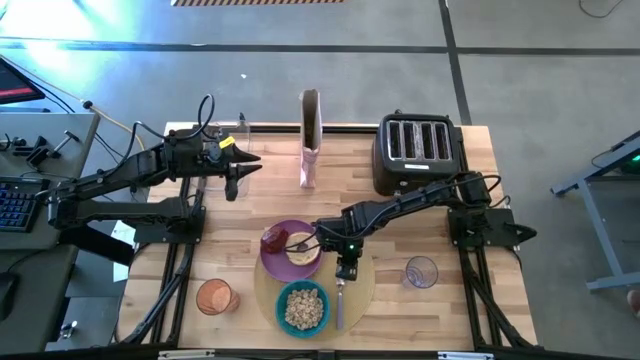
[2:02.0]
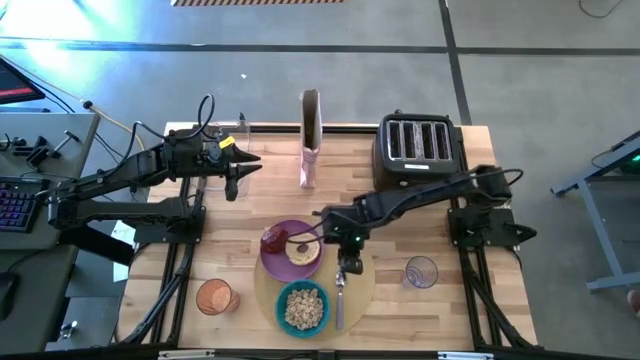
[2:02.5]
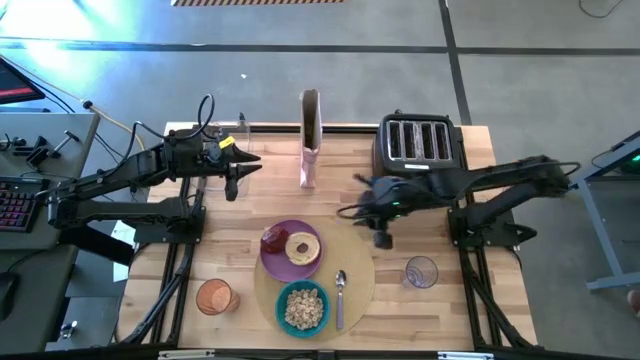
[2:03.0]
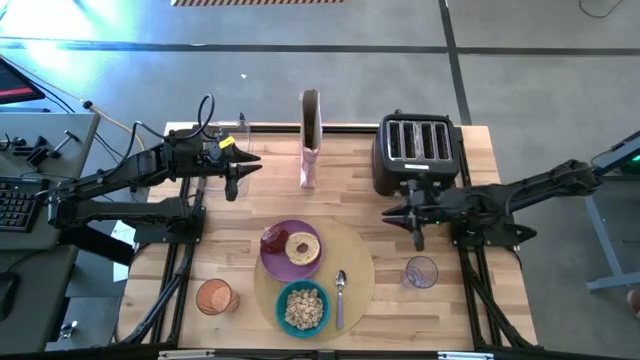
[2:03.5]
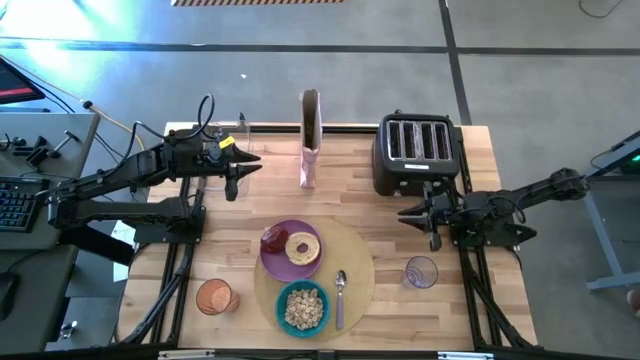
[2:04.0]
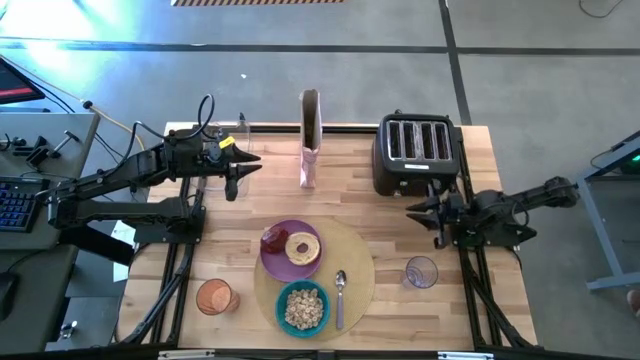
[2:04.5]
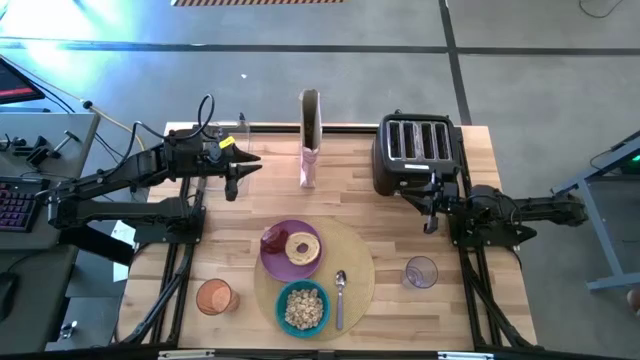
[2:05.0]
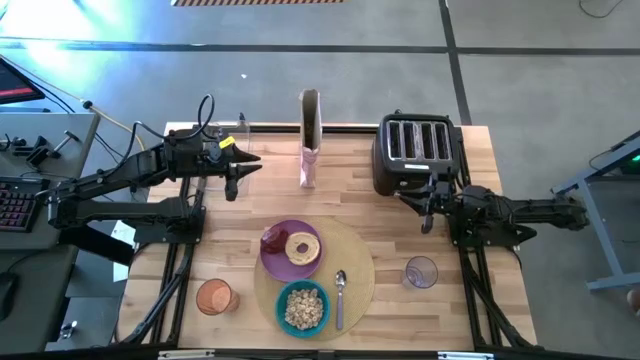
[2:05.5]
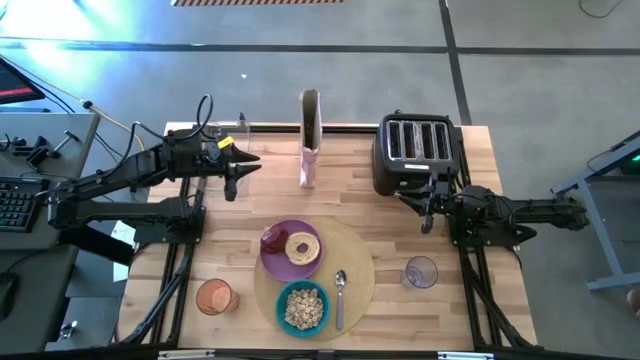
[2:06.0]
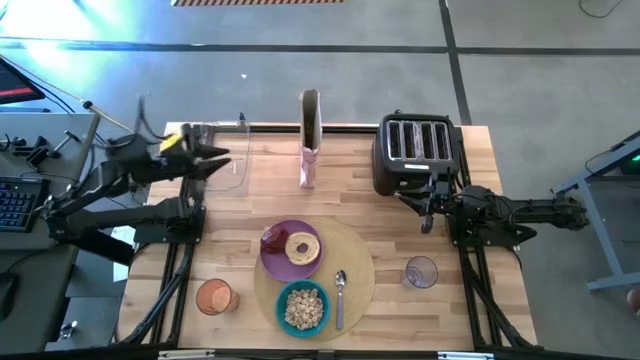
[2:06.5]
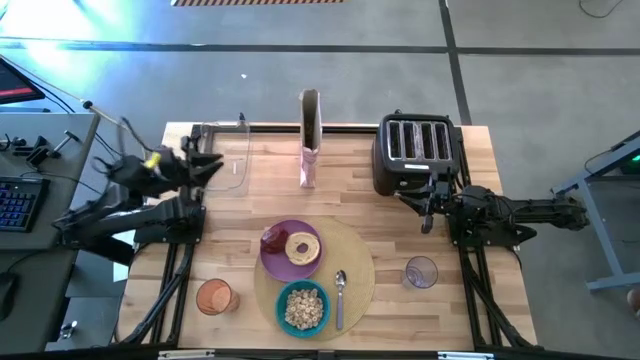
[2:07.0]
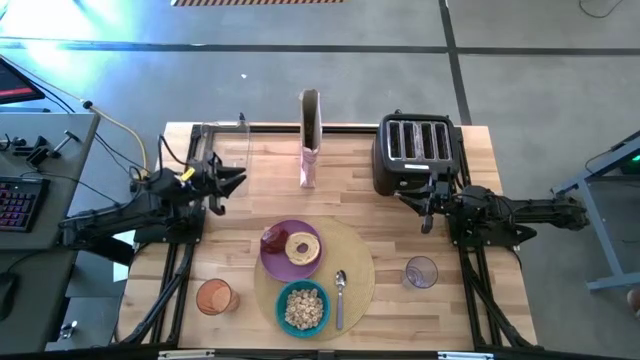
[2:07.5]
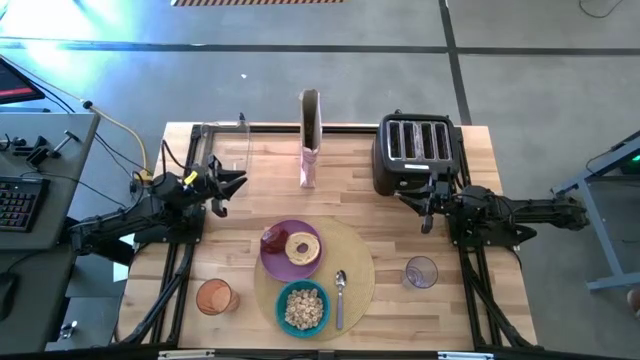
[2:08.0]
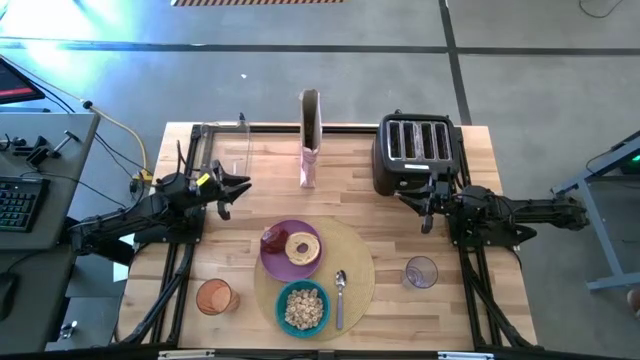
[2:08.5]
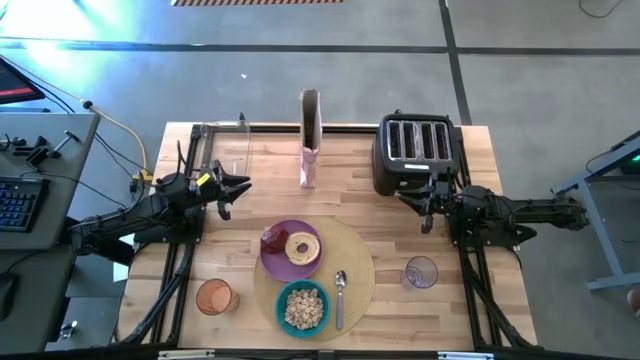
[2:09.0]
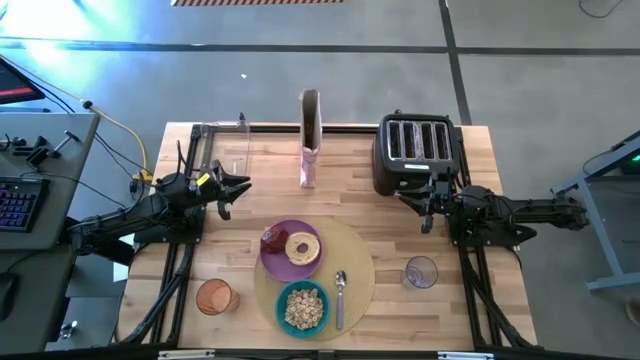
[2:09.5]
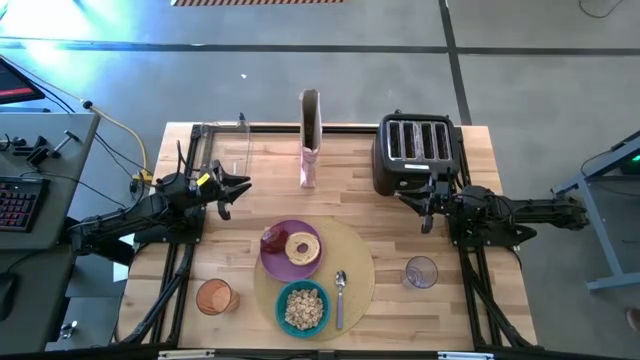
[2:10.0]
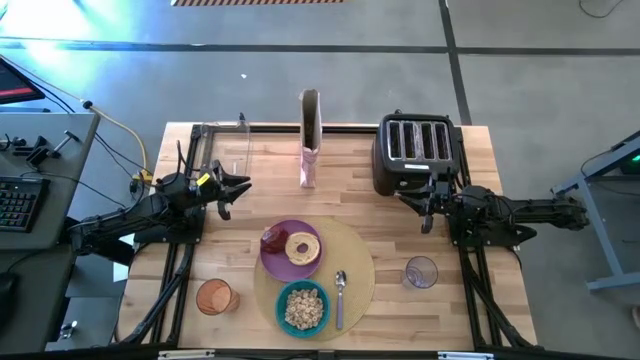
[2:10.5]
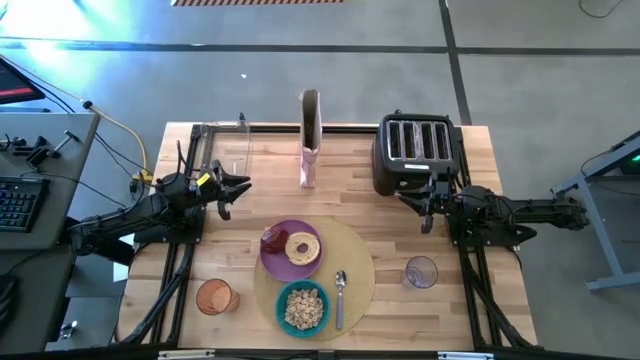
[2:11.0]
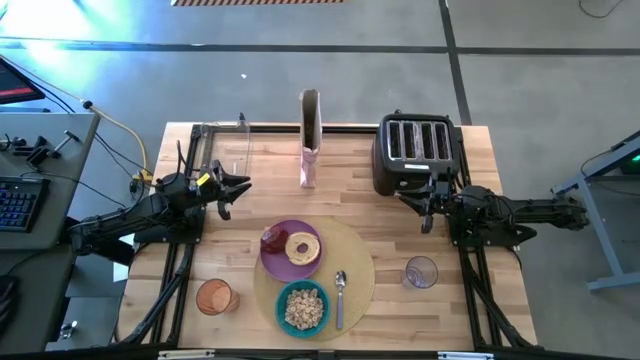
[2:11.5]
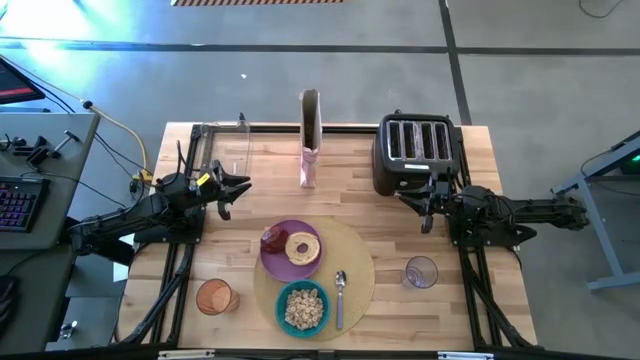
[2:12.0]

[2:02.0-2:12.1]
Task: Arrange a breakfast setting
Return to Home Position

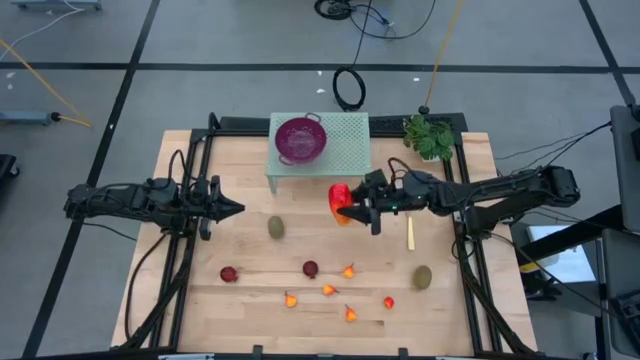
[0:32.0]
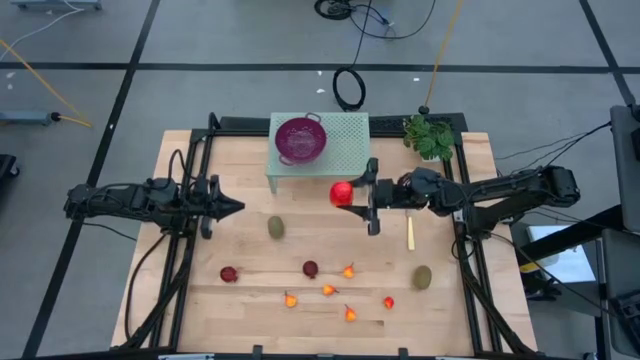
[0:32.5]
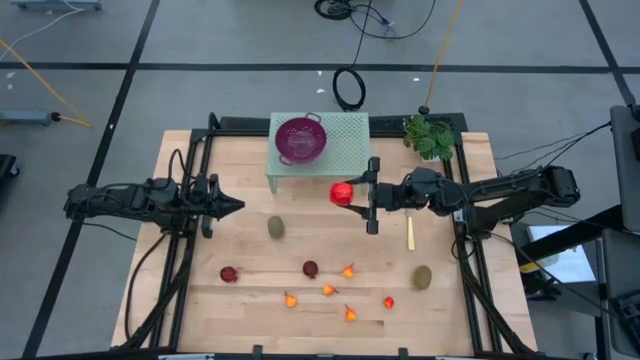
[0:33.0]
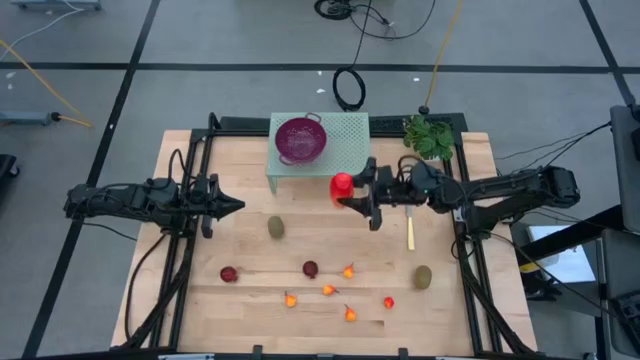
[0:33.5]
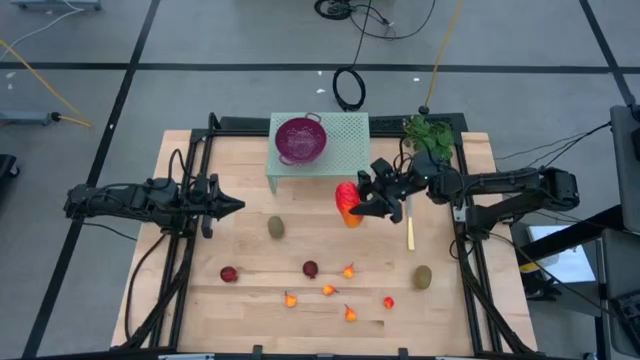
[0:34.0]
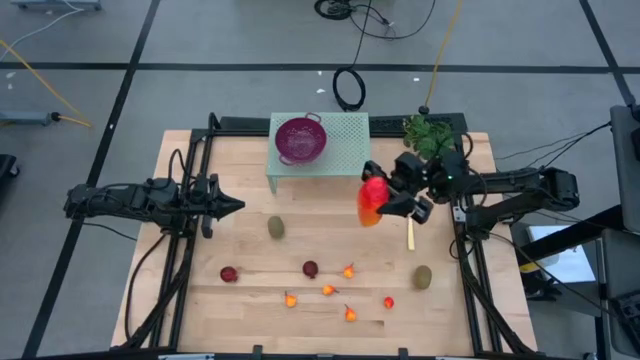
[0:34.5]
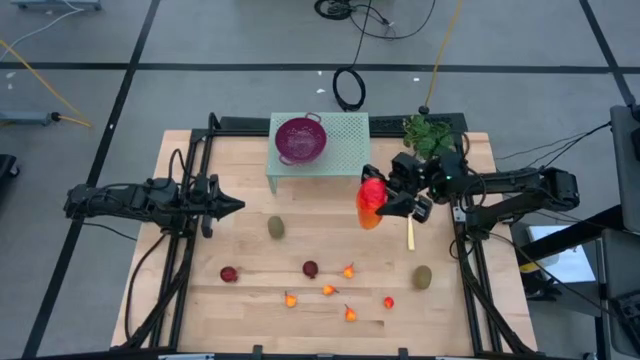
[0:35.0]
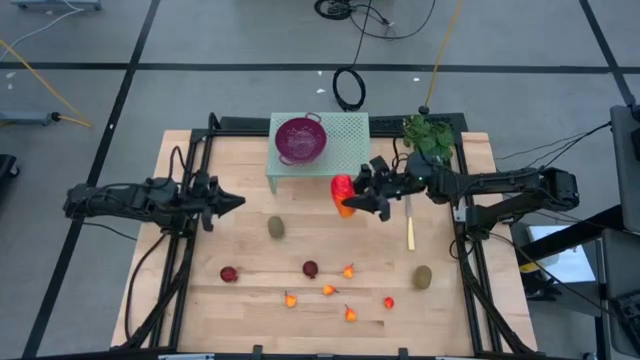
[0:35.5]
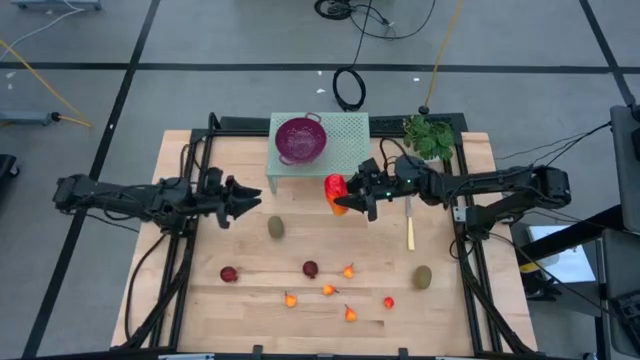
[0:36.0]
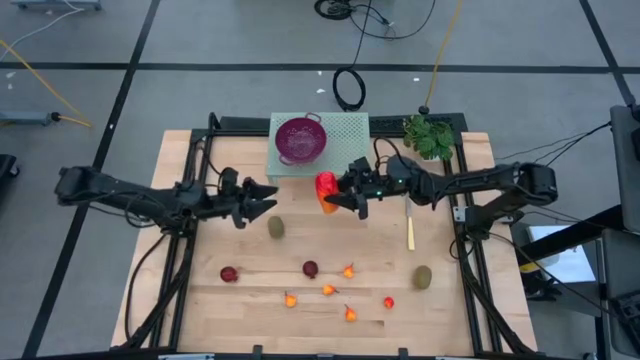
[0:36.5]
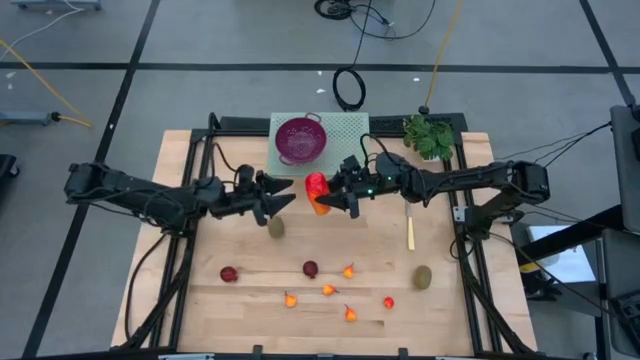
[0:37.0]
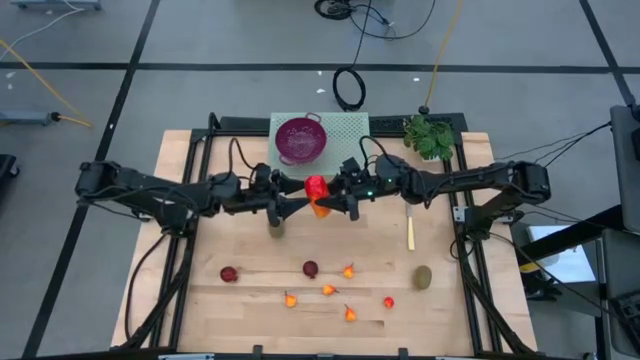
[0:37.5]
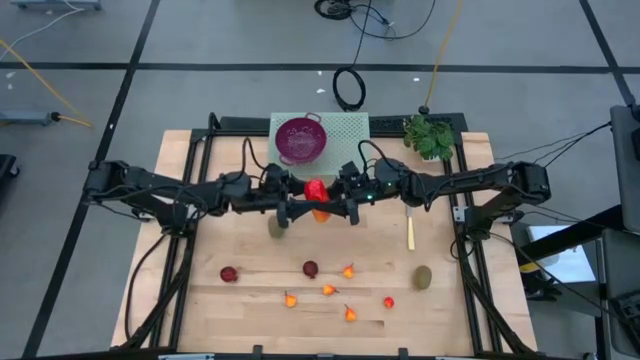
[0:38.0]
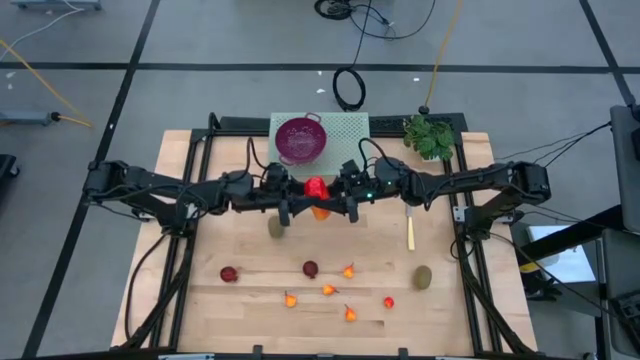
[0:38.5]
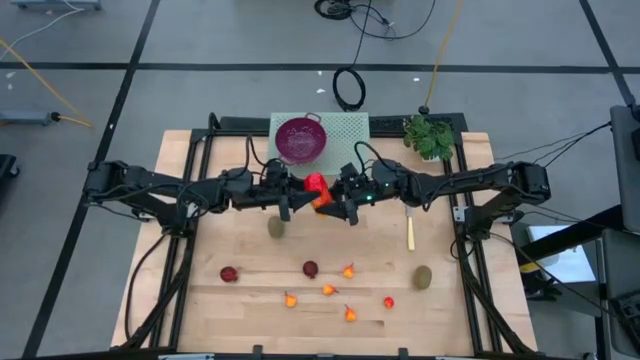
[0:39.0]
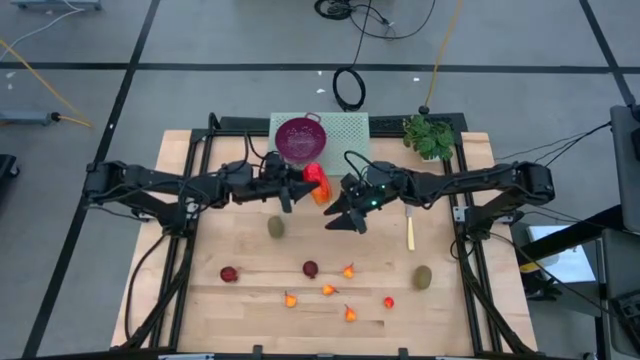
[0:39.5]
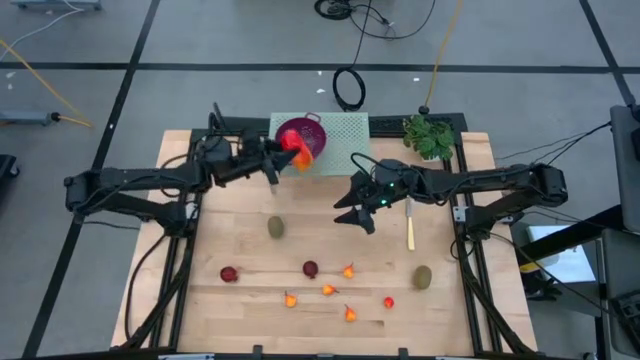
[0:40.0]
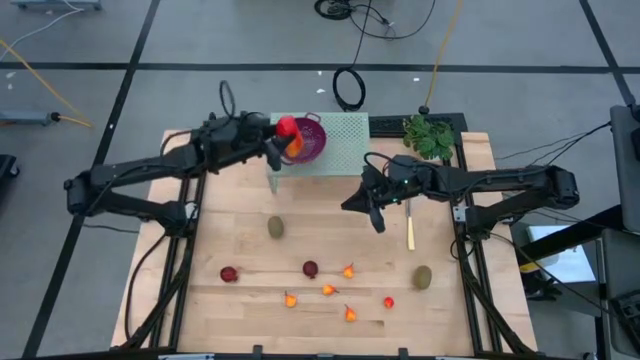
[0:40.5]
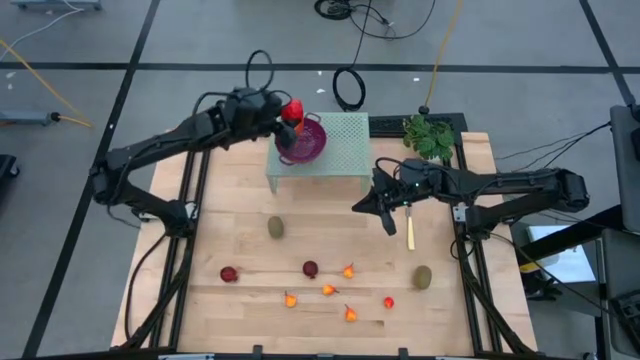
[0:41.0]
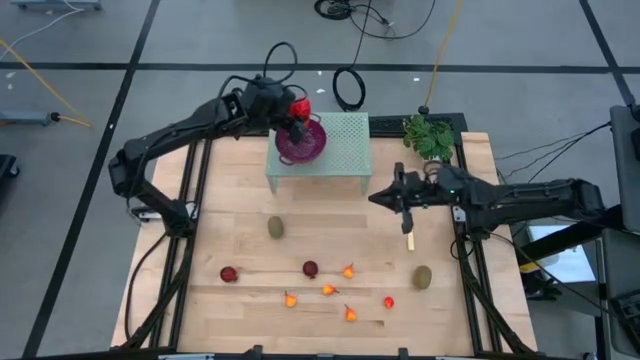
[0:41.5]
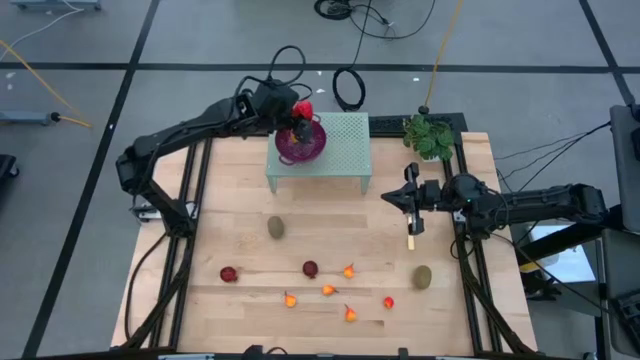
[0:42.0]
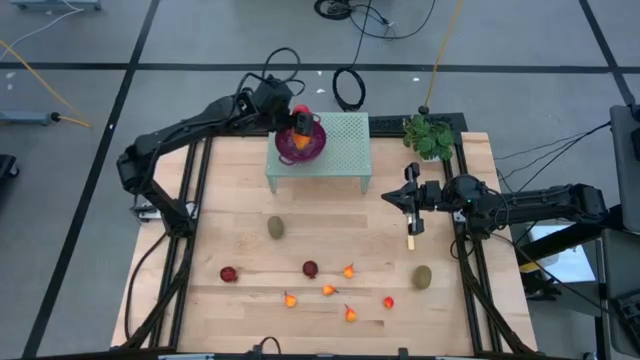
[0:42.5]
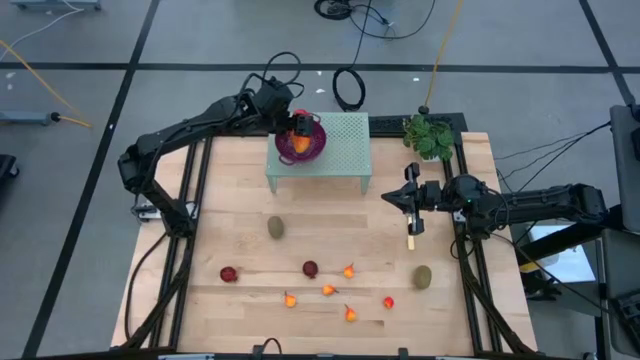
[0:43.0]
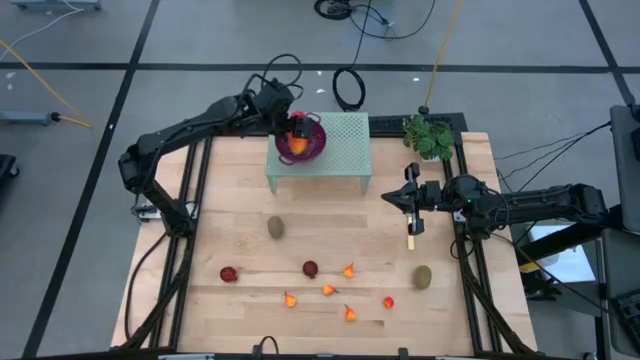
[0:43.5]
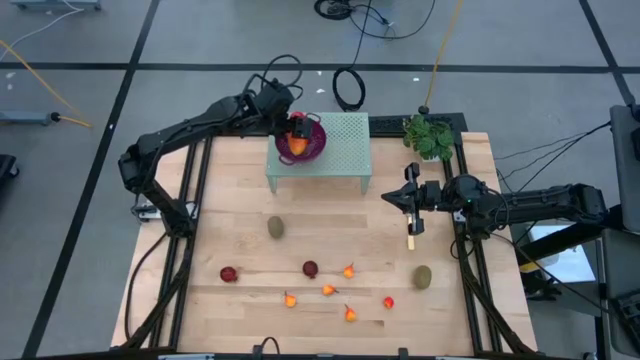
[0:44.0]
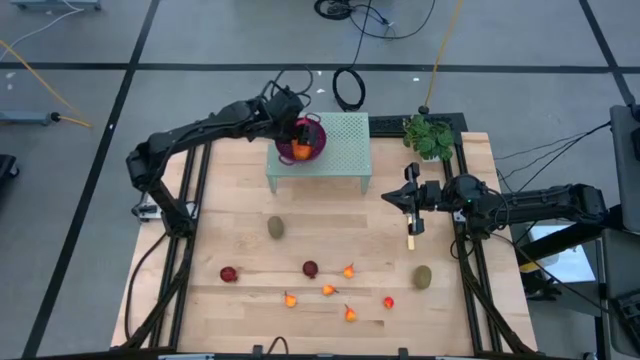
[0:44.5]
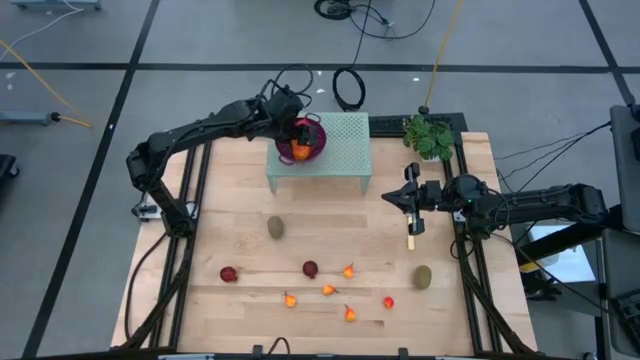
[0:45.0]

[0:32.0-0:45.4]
Task: Pick & Place Fruit
Put the mango into the violet strainer bowl on the shelf
